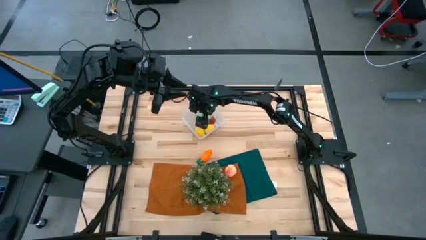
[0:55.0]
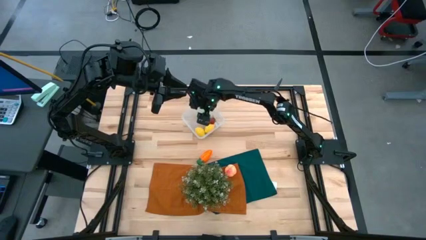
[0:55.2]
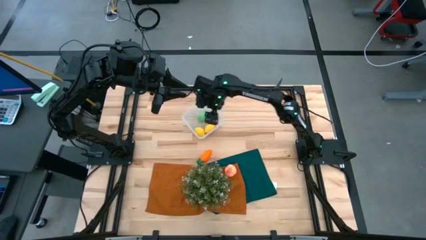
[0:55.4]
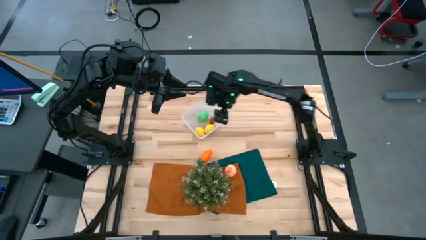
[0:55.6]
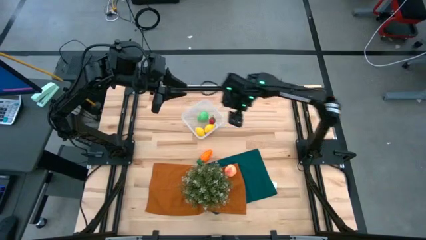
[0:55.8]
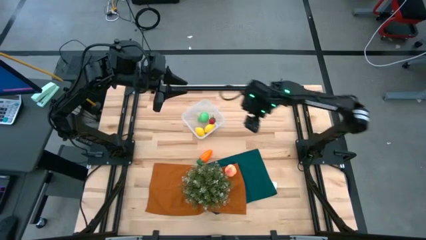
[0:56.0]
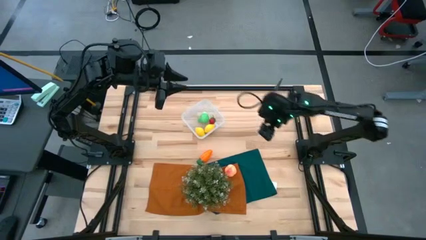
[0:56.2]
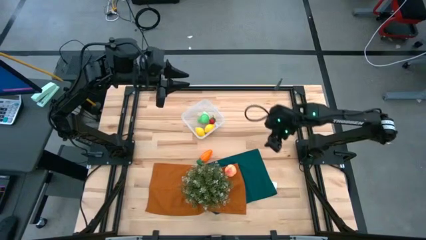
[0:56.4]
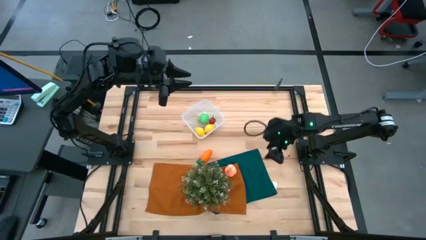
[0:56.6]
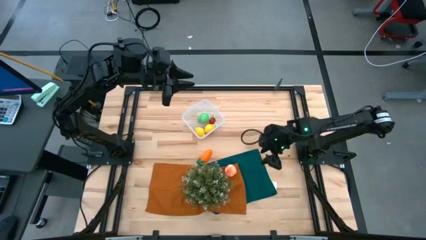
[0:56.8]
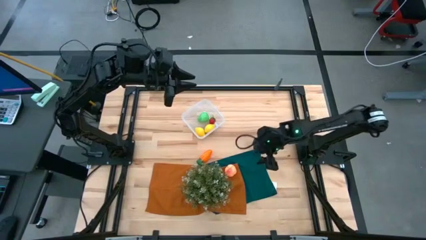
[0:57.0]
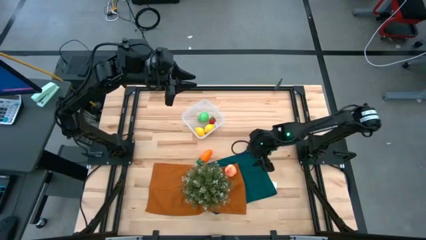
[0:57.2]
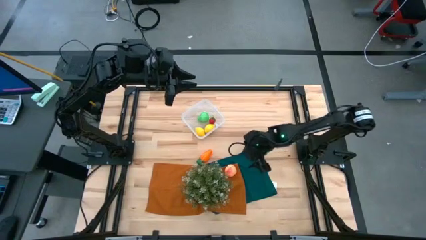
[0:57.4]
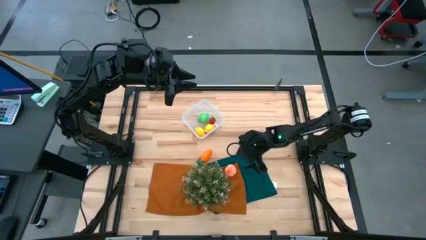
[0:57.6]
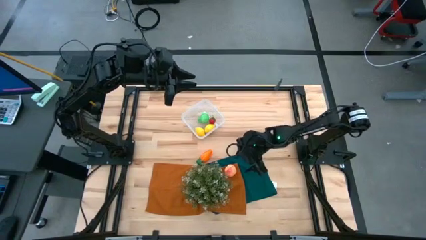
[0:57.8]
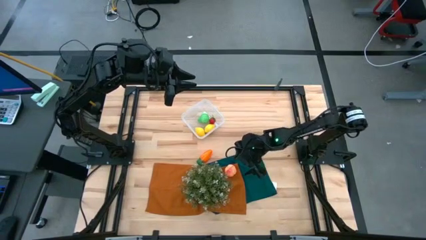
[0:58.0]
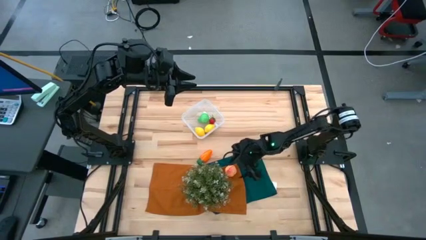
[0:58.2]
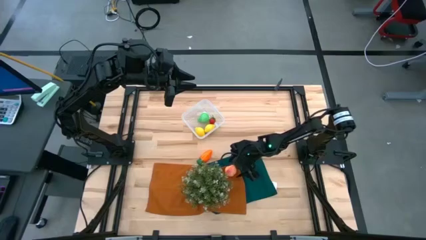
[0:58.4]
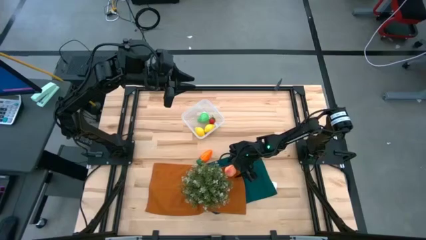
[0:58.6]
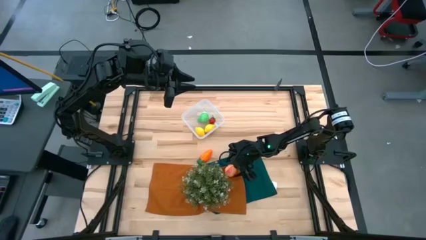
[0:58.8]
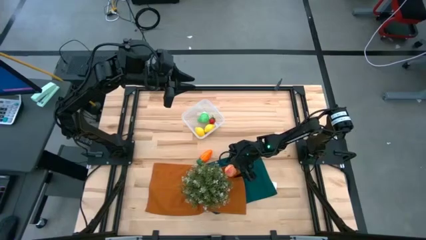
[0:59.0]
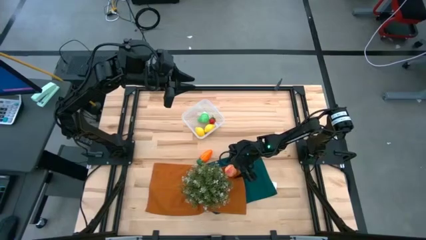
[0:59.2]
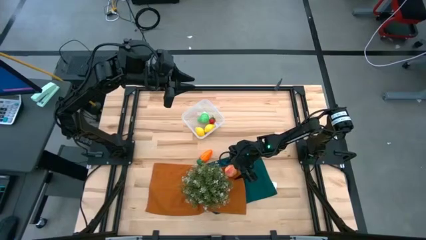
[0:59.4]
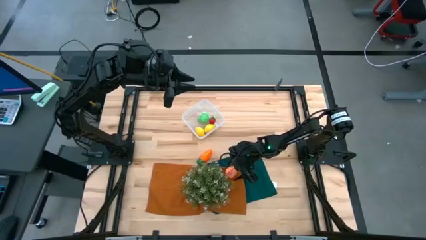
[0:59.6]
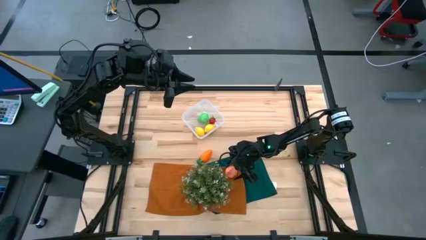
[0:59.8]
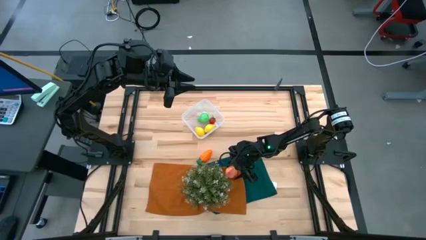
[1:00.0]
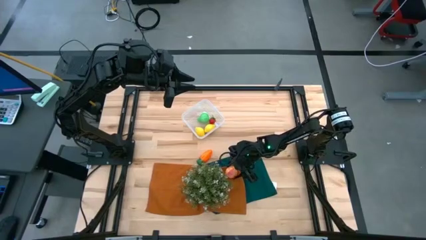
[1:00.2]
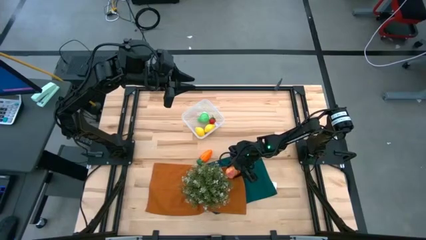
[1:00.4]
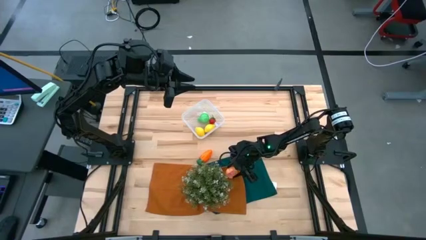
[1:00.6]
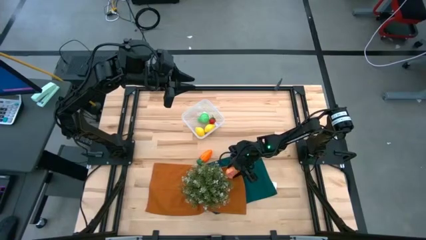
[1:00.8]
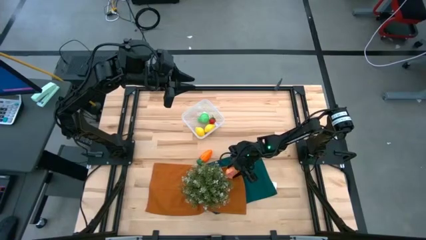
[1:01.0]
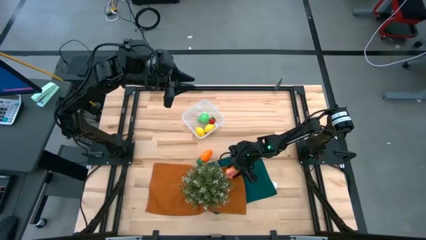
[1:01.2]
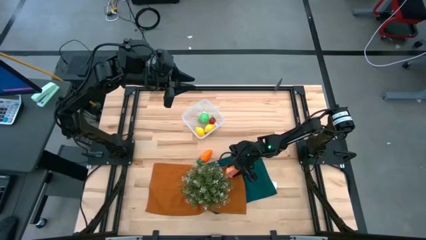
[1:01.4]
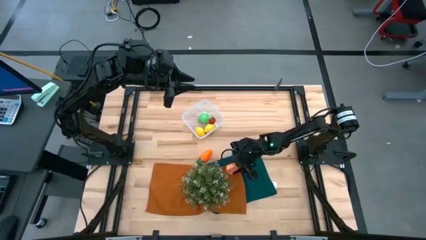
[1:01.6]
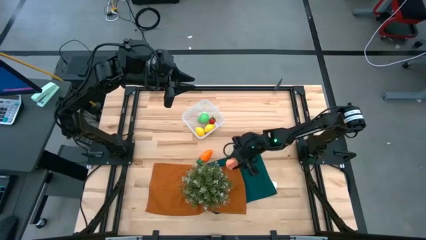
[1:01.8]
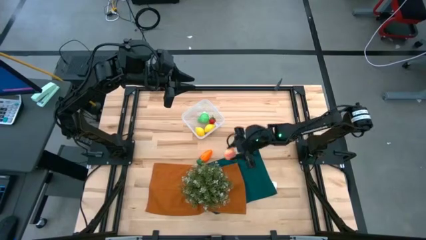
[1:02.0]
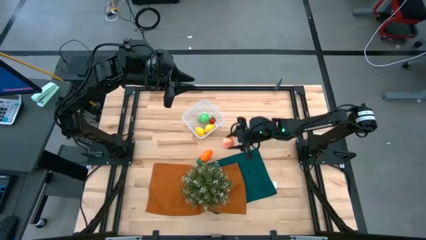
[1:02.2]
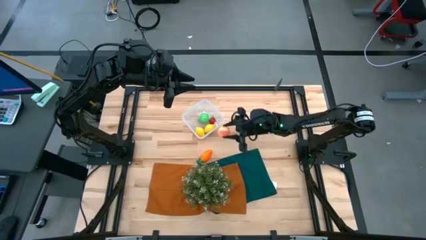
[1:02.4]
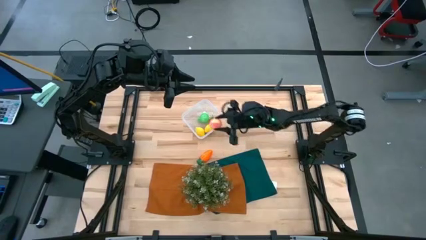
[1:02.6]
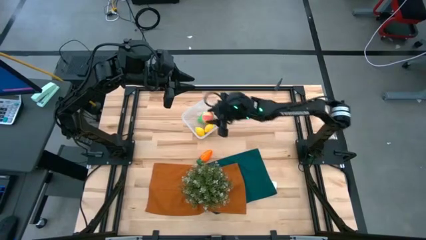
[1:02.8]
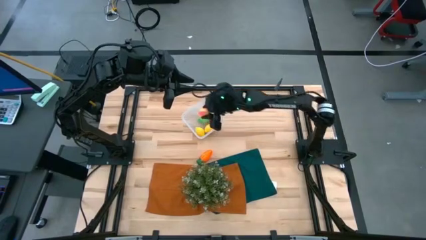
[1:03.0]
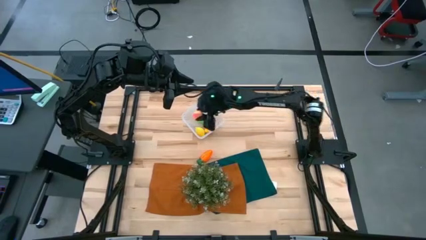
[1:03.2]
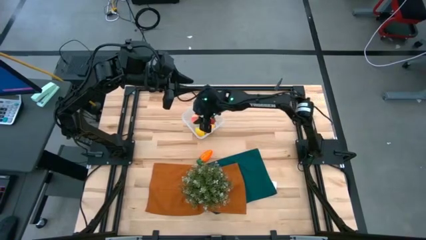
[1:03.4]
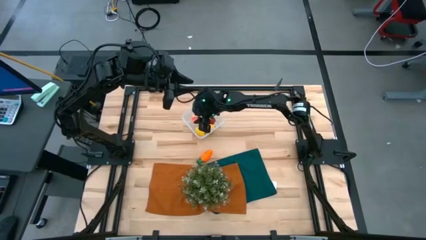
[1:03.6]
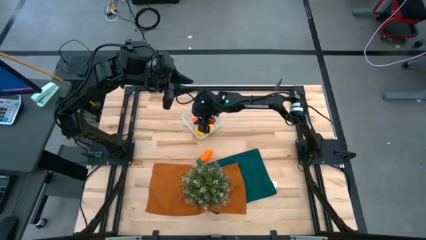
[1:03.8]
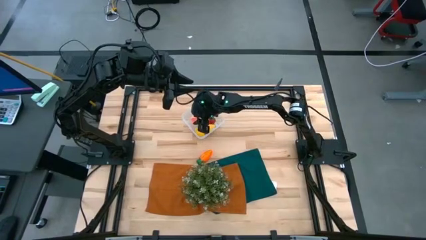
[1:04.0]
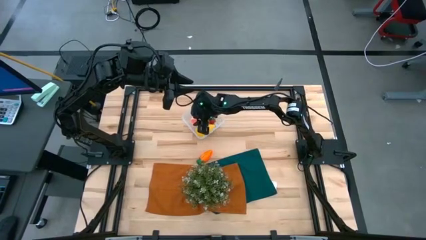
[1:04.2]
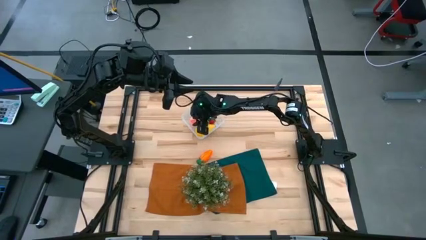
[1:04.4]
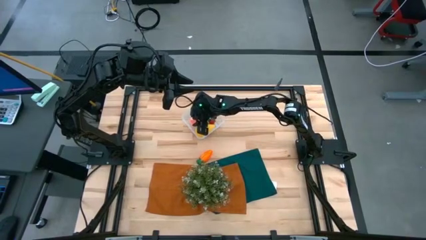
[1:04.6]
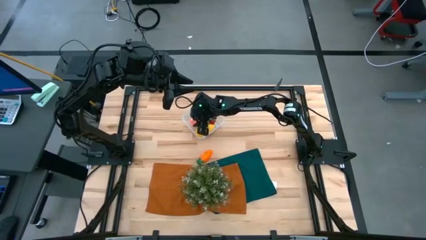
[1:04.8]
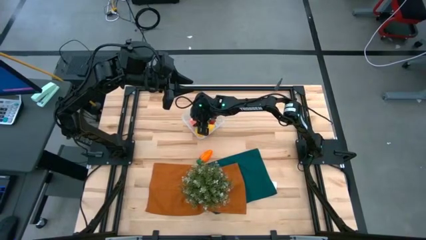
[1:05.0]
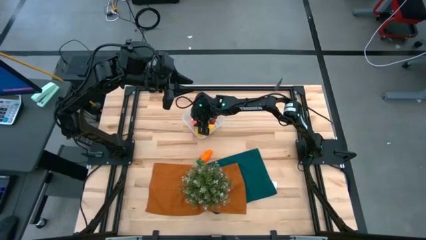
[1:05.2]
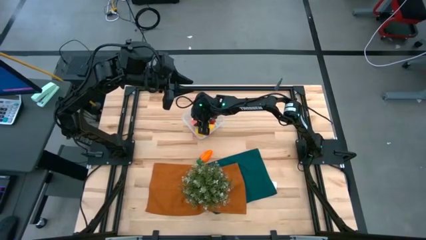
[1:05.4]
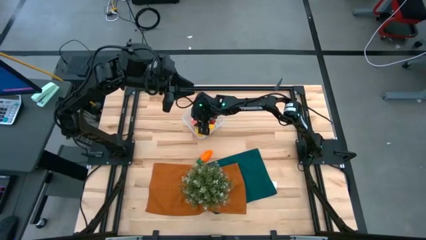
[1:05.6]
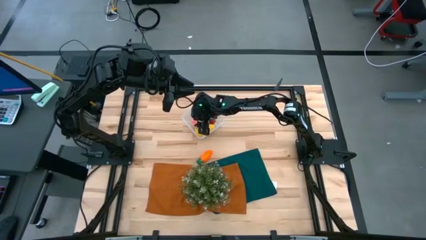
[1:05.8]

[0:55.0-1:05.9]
Task: Pick and placing Produce into tupperware
Put the peach into the transparent container

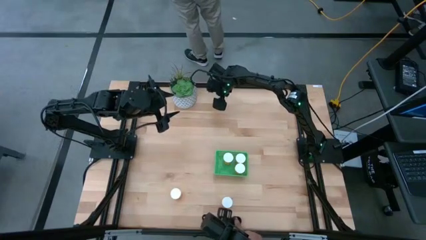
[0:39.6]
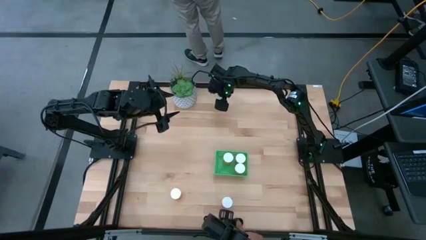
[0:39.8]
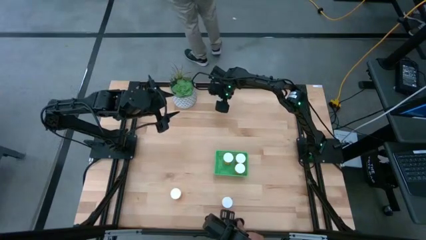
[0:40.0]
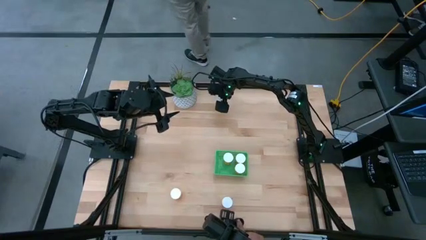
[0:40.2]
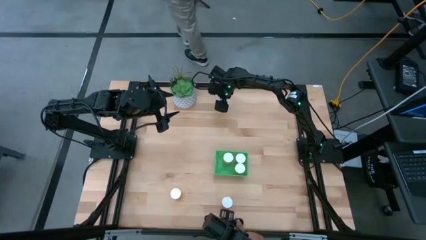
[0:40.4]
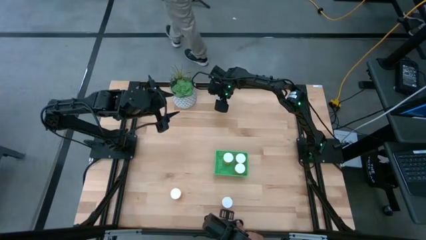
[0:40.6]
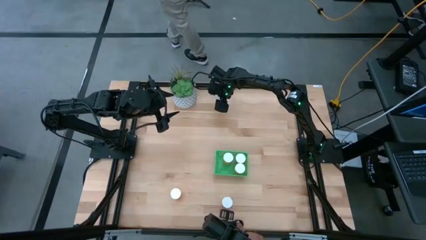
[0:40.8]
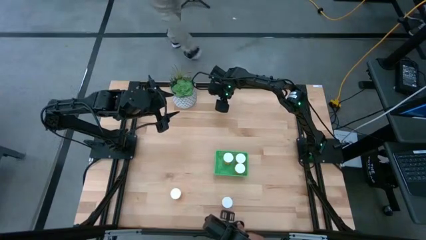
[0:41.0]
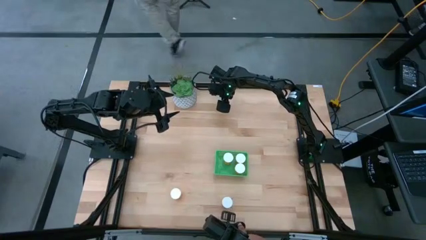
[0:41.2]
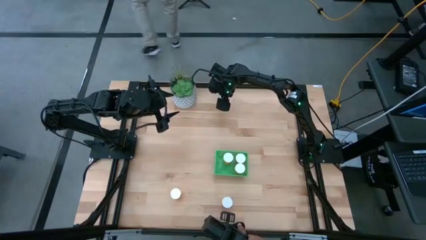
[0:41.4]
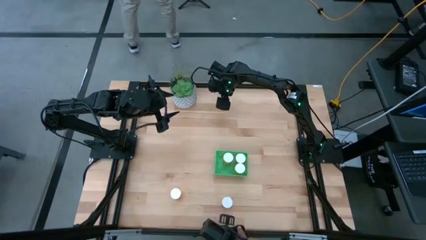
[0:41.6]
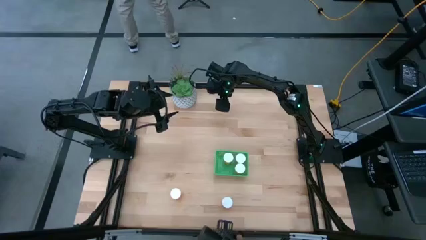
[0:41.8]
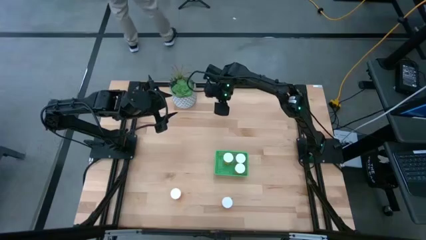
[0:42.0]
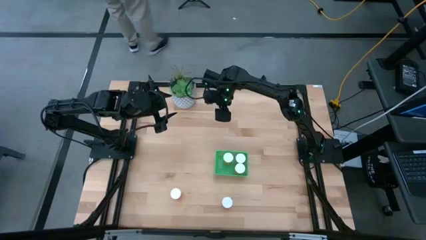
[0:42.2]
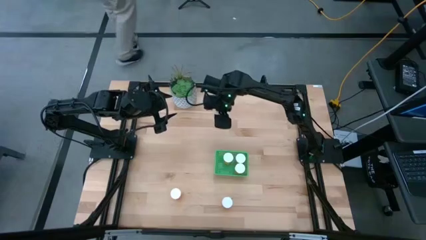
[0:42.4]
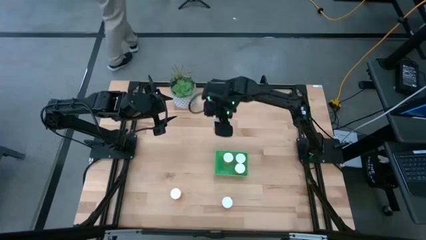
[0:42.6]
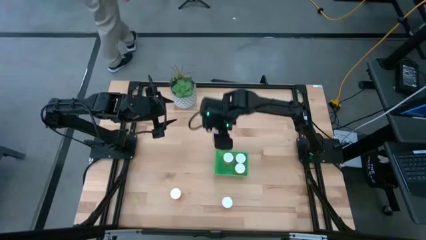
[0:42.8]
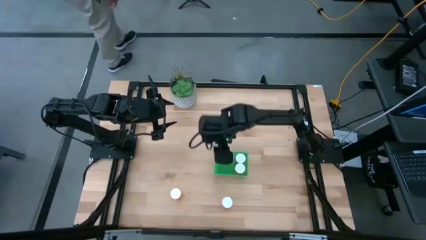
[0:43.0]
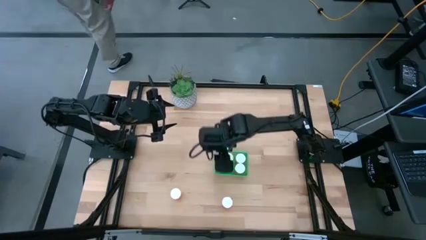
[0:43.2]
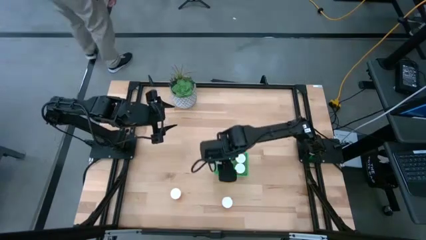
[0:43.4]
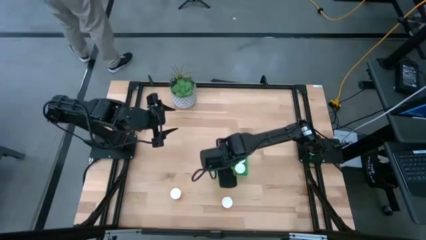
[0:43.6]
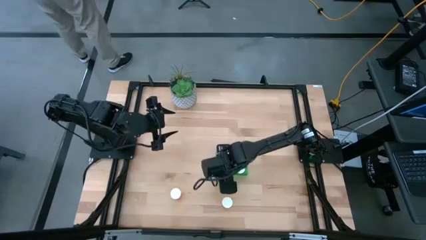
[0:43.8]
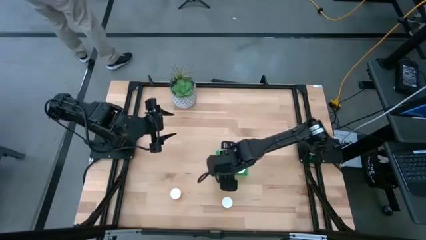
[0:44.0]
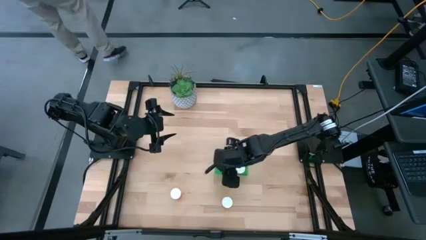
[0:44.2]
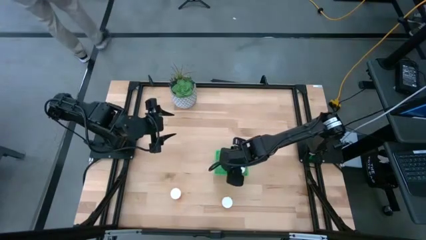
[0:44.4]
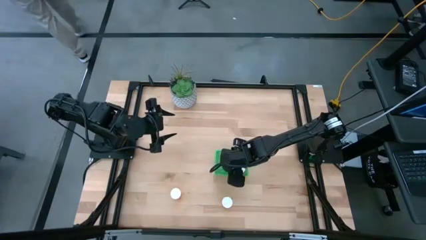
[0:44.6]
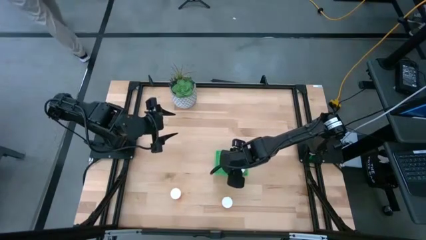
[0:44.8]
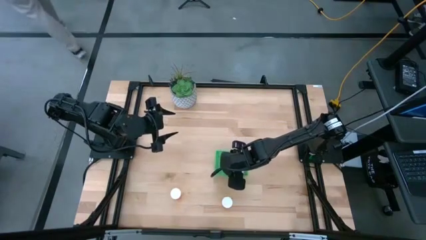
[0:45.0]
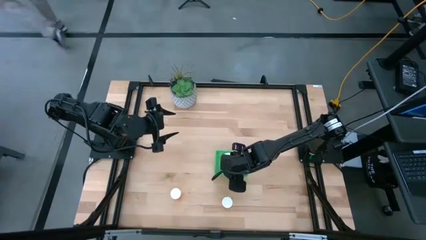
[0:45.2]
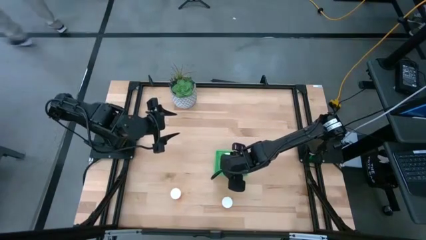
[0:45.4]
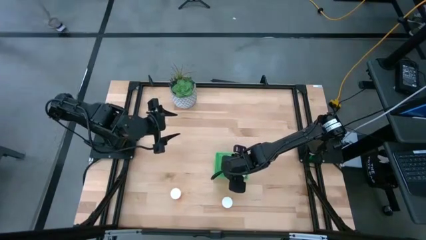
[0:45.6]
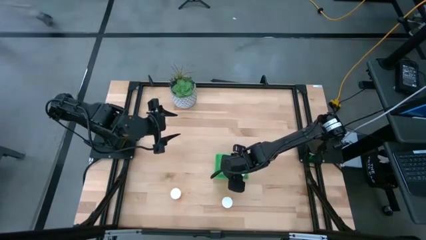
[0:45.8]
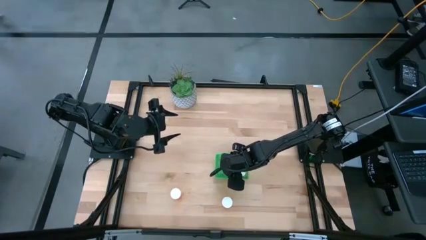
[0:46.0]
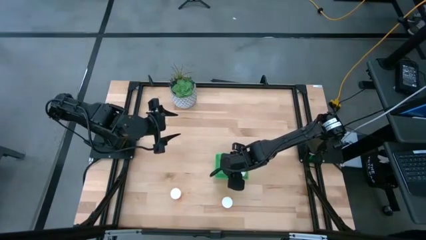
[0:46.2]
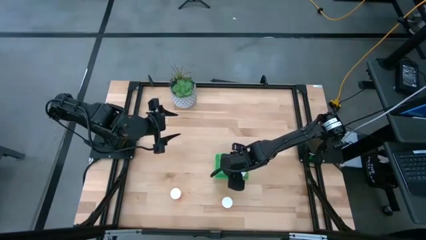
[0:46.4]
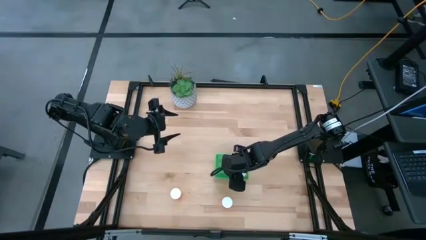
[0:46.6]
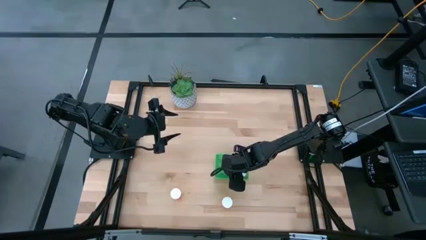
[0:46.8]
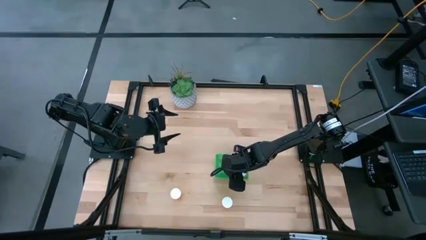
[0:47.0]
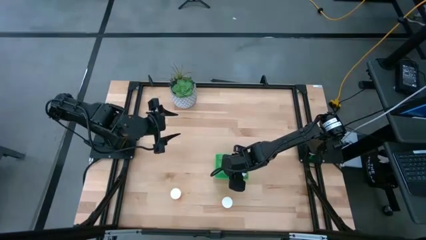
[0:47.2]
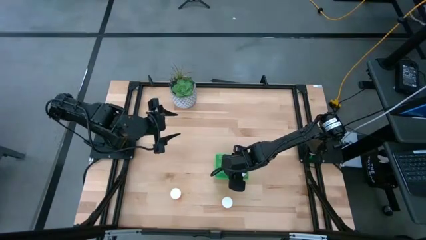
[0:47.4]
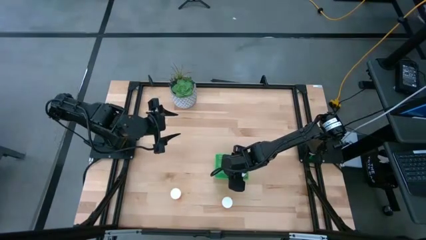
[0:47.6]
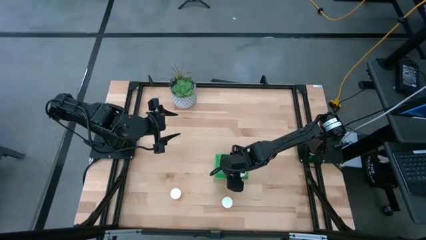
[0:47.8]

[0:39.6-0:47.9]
Task: Pick and place pill bottles into a basket
Put the orange pill bottle into the green bin
